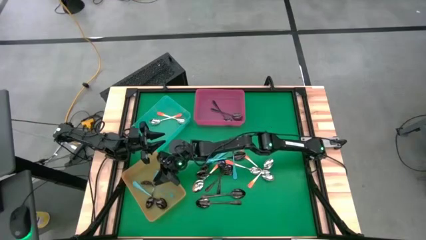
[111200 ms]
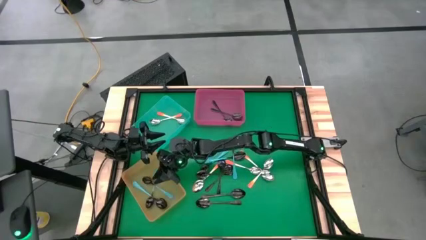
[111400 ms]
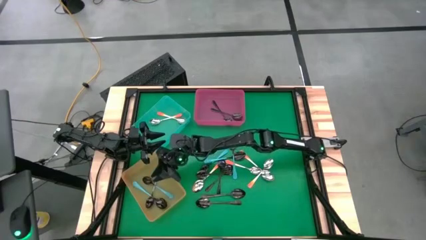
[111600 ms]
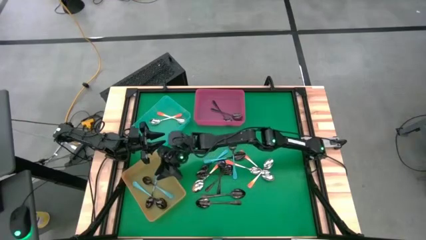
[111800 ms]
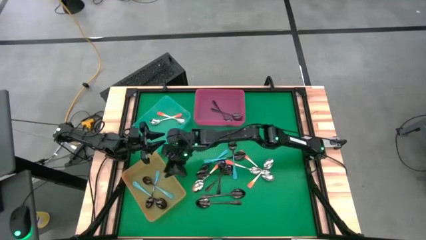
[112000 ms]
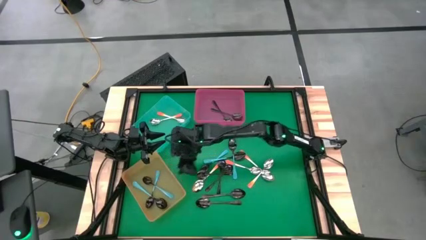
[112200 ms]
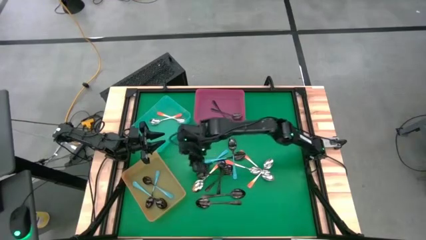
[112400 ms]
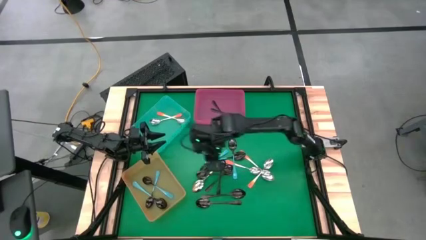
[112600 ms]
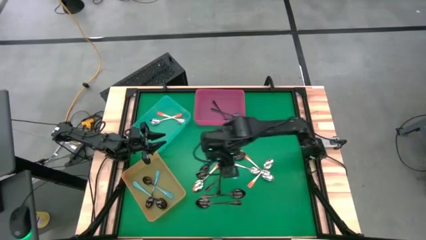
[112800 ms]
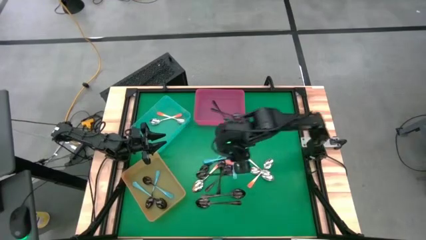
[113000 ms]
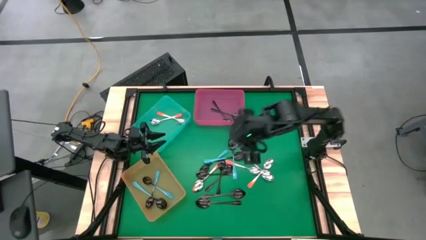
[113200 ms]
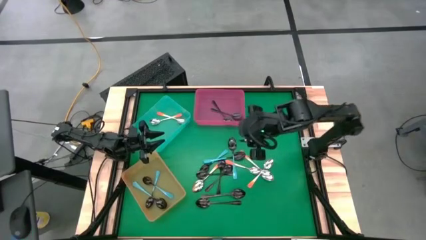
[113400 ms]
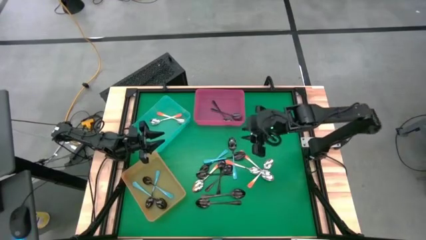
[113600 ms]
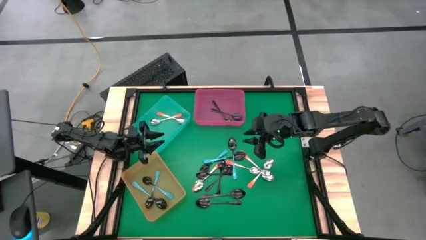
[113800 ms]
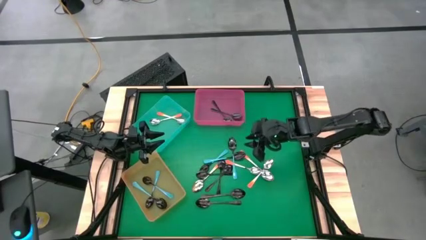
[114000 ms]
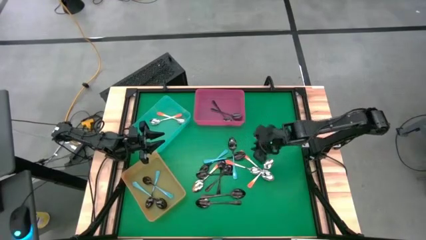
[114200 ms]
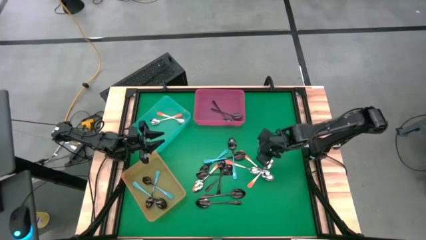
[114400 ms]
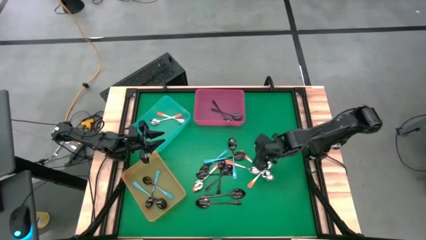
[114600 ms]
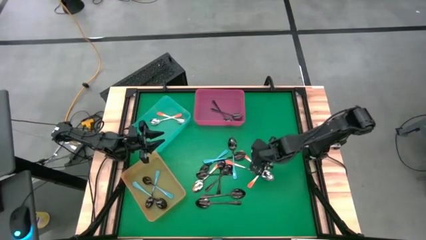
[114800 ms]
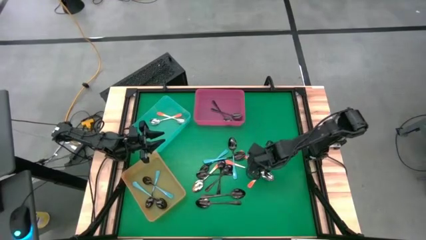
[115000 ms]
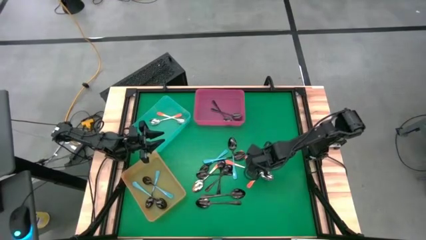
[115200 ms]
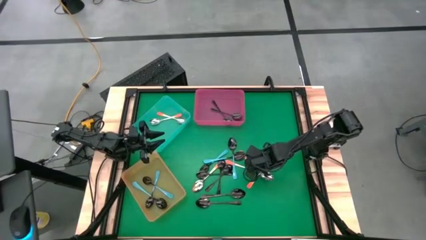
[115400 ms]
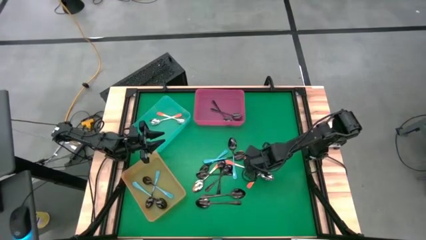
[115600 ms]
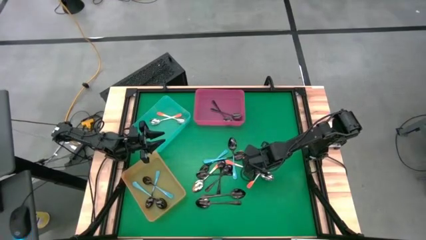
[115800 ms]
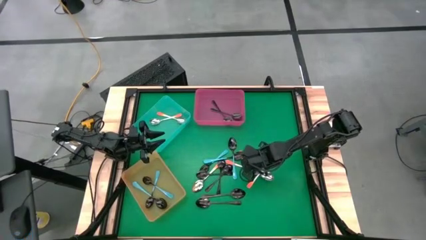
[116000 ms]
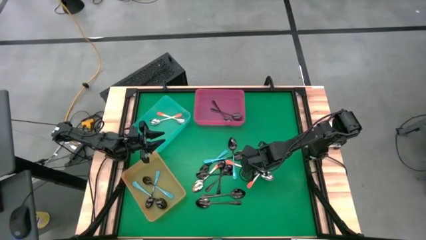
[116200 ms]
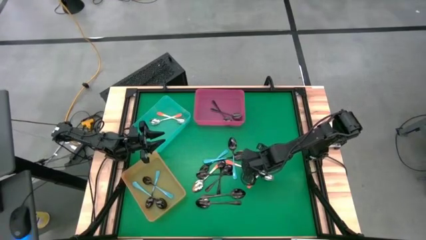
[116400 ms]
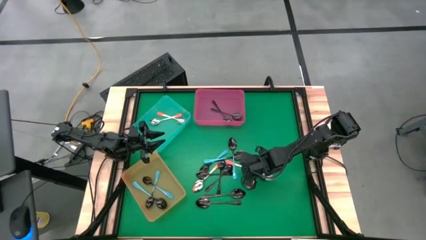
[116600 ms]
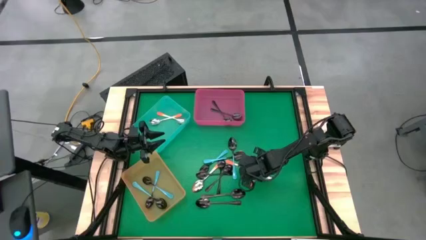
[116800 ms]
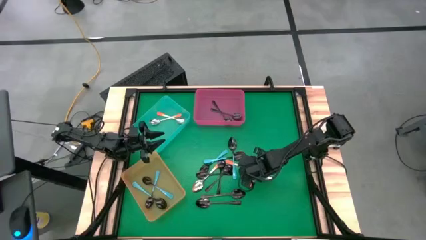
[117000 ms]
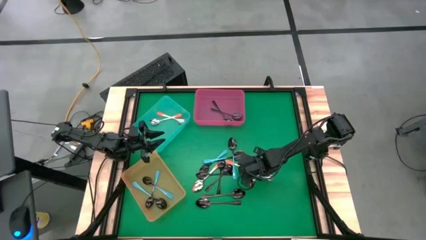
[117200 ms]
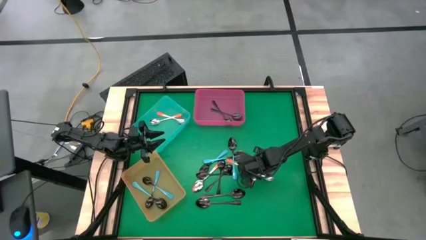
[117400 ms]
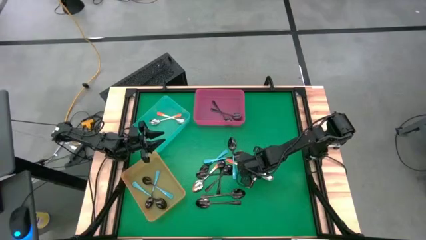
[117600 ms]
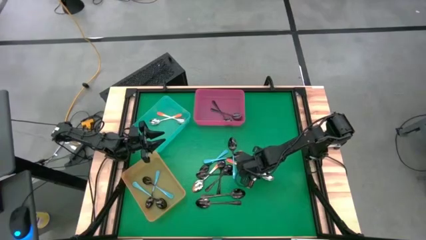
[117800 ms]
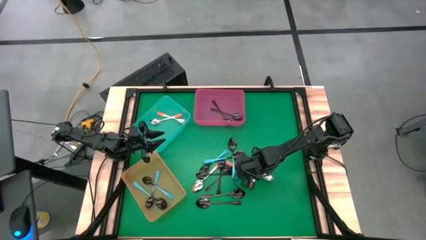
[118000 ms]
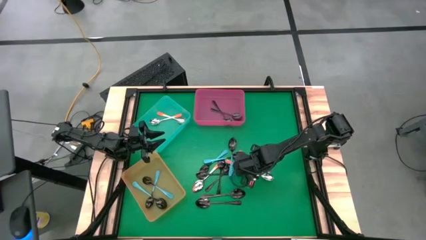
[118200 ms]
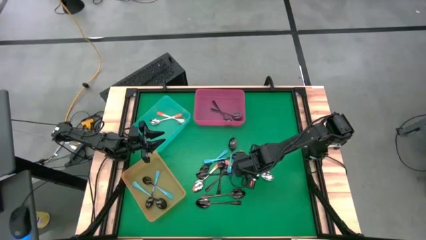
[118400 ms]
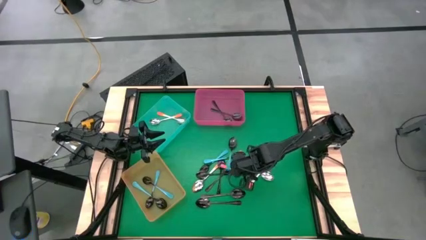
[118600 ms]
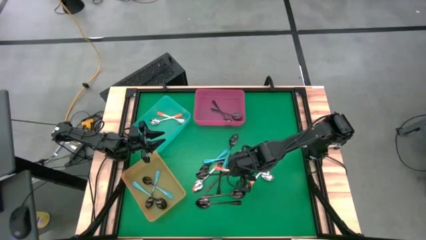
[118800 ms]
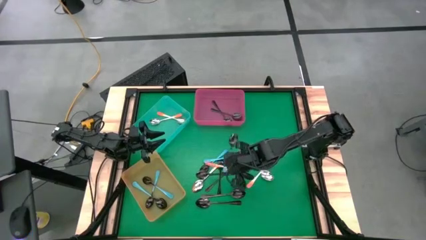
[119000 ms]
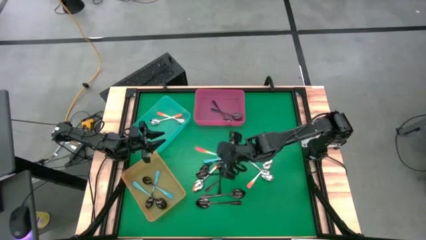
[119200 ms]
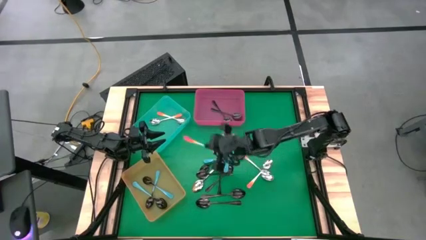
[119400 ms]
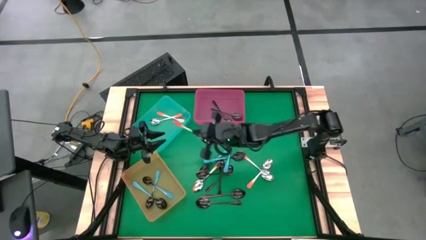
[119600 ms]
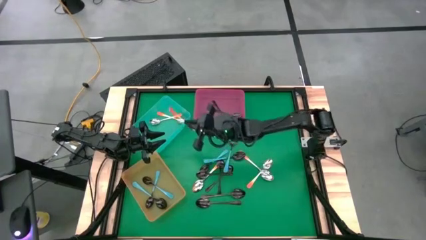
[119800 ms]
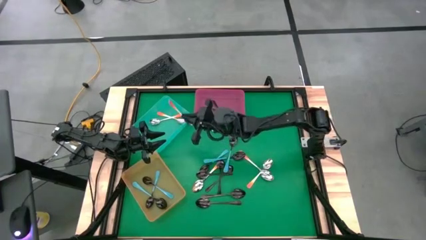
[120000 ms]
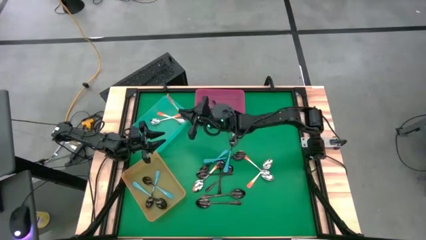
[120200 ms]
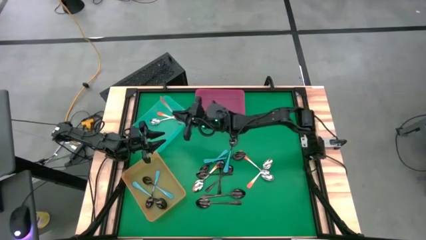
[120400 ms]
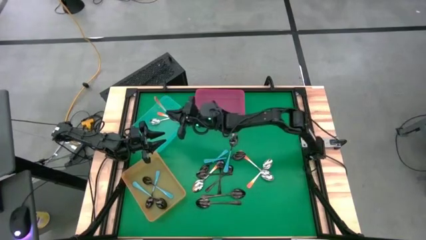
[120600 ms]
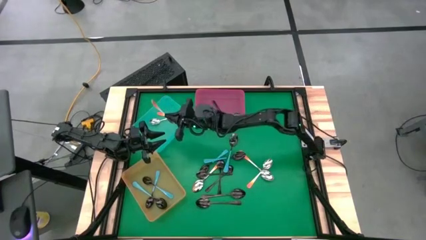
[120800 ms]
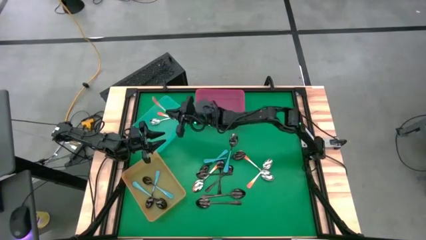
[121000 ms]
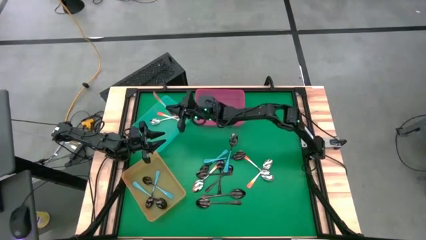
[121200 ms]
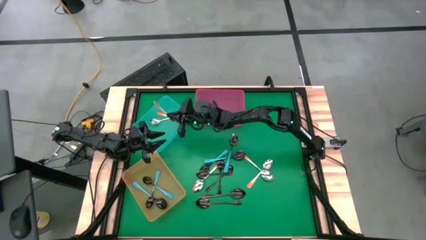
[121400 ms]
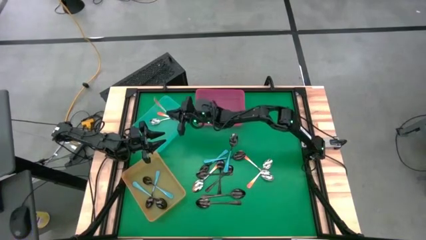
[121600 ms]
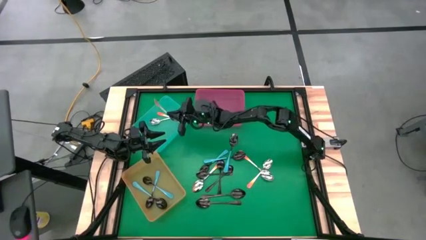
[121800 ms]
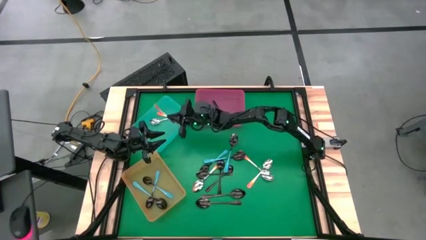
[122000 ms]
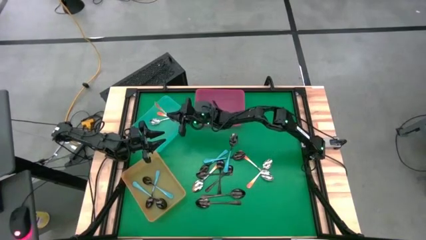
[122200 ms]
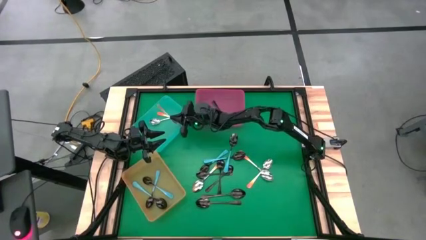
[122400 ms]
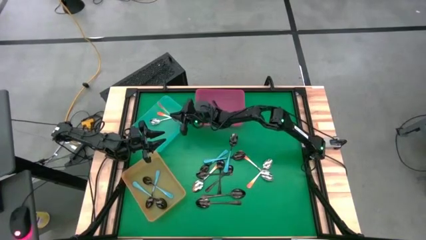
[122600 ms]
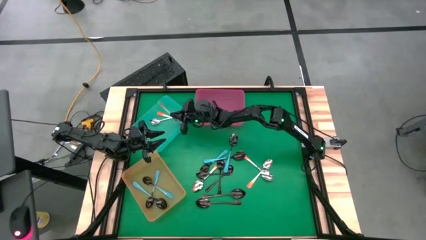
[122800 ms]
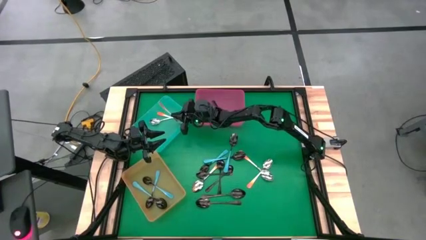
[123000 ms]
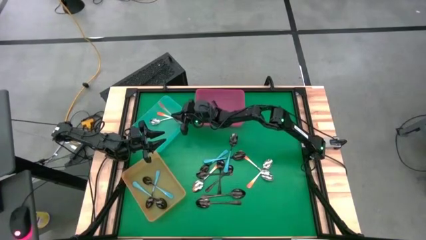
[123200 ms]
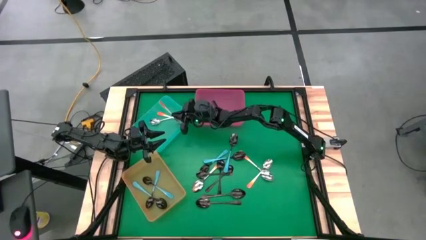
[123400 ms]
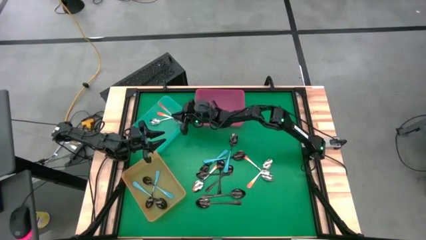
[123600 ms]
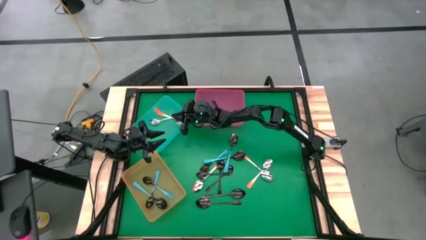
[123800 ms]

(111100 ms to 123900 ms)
Task: Sort silverware by color (type)
Put the orange spoon into the blue bin

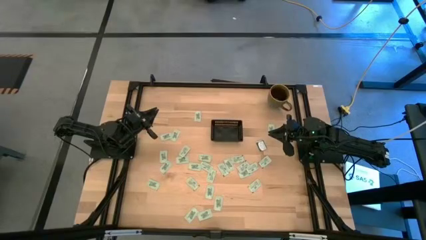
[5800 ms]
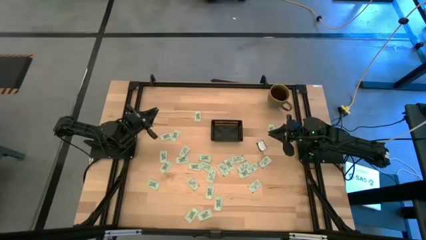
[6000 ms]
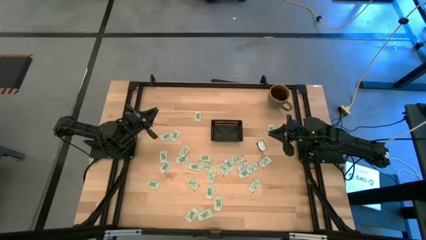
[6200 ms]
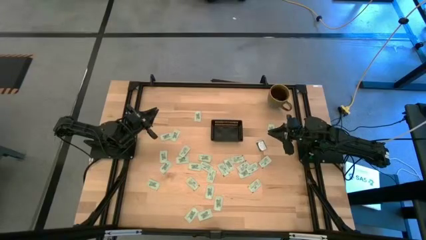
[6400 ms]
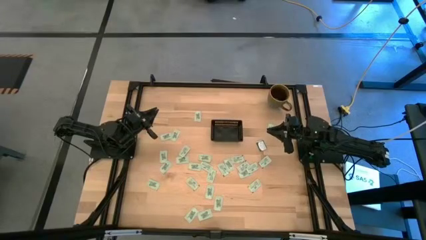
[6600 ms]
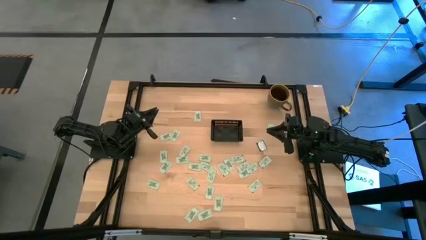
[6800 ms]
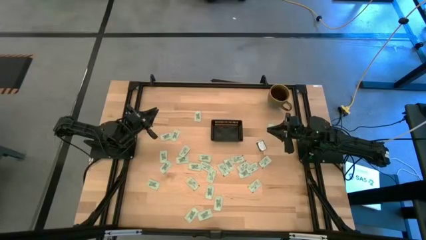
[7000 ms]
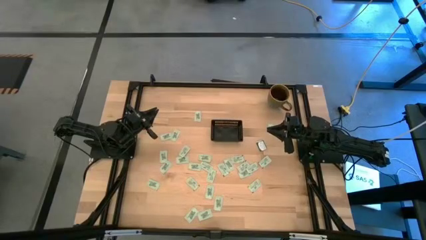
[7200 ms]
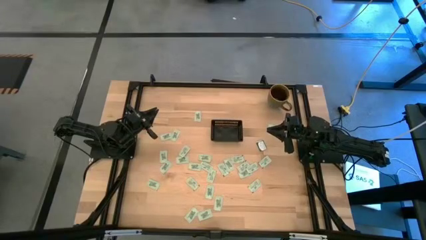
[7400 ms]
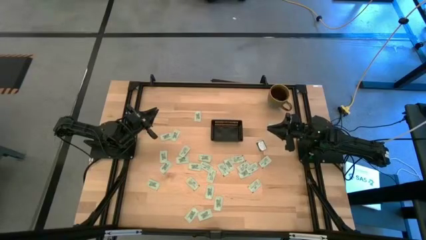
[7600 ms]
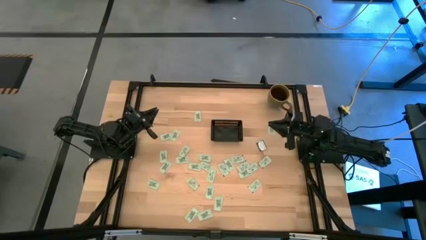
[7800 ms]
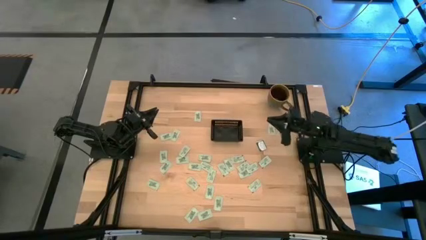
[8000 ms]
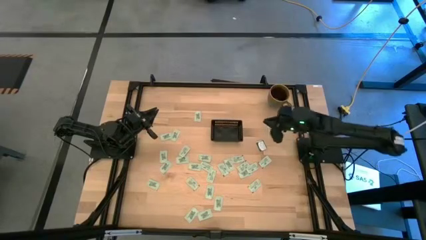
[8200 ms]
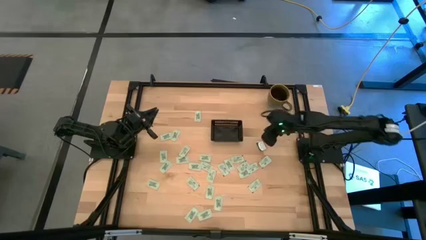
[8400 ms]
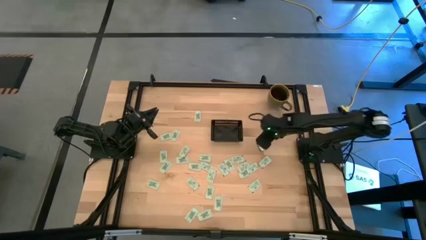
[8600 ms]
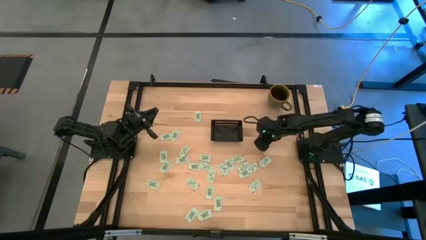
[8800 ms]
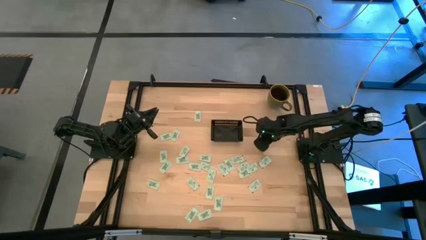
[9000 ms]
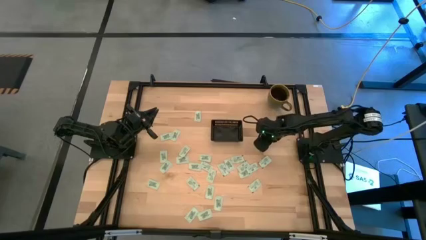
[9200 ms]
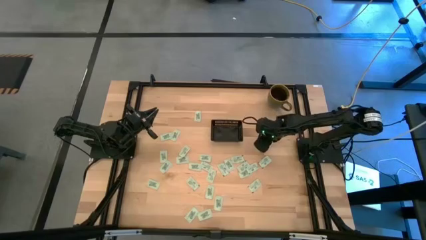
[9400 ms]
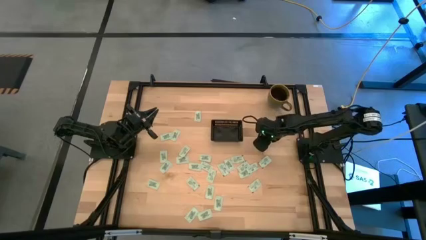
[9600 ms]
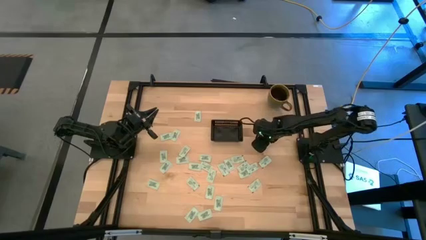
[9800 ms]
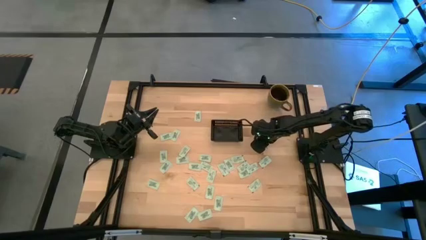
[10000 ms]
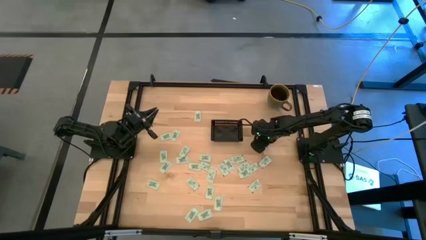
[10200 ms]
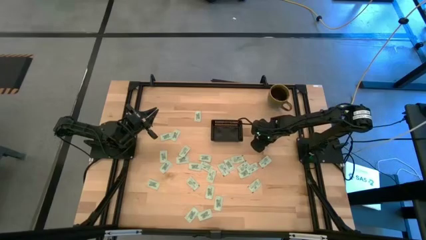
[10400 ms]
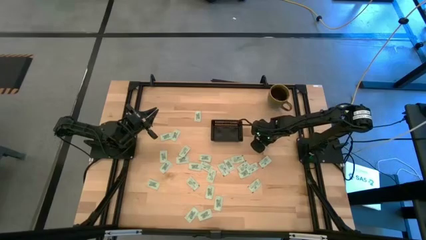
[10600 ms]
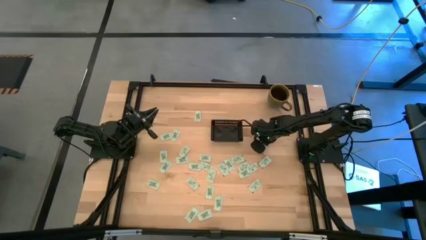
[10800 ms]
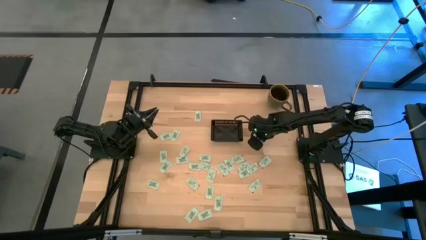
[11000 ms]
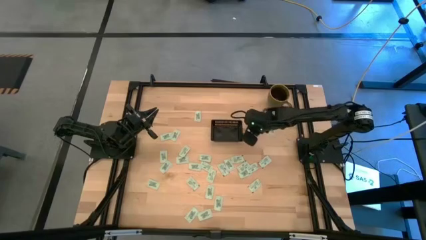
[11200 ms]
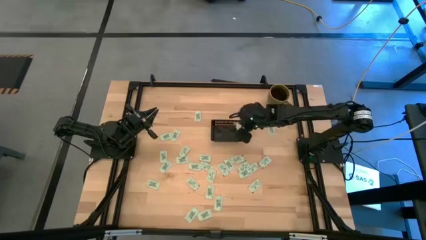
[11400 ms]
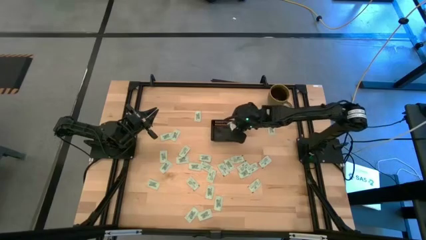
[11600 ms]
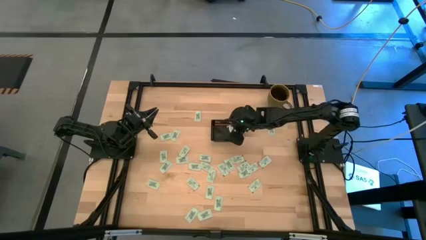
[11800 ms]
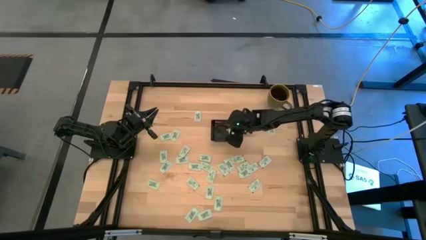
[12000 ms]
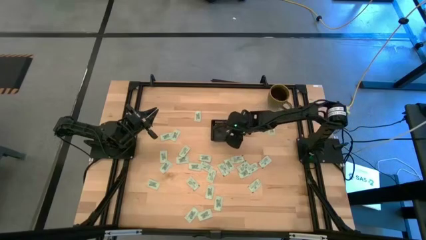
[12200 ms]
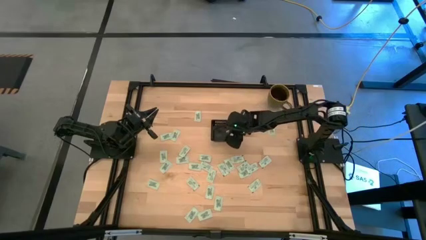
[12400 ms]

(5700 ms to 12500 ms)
Task: Pick and place Stevia / Truvia into bins
Put the truvia packet into the black basket
